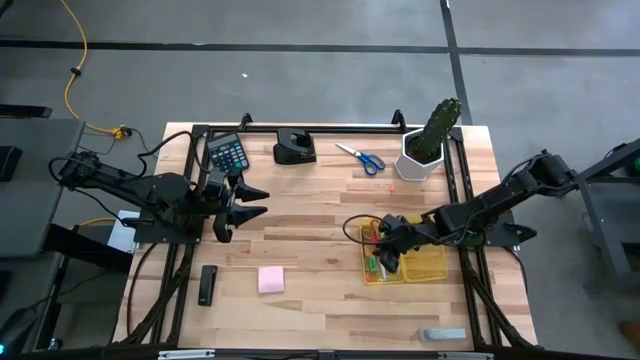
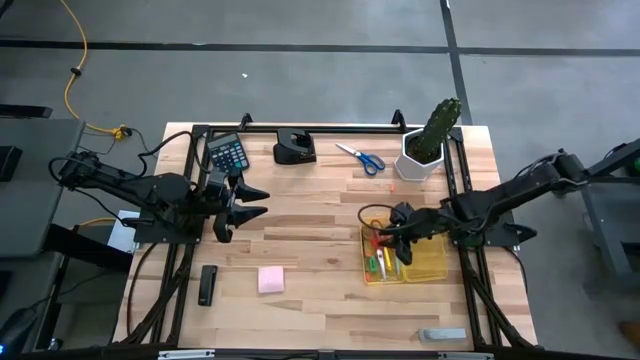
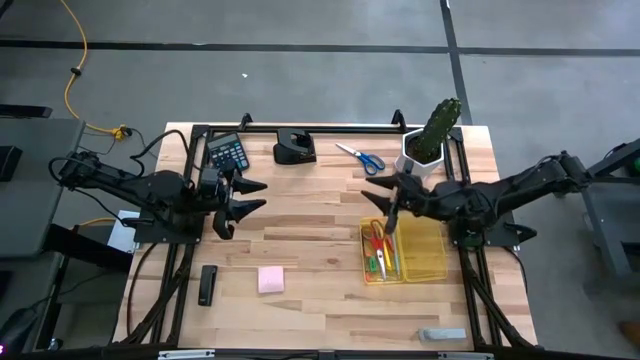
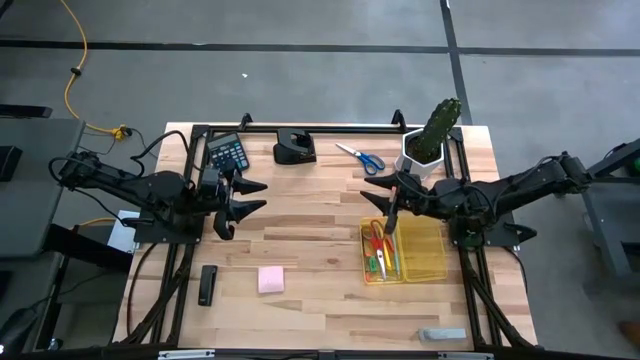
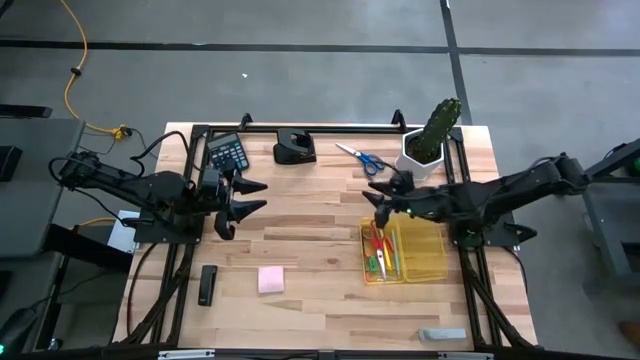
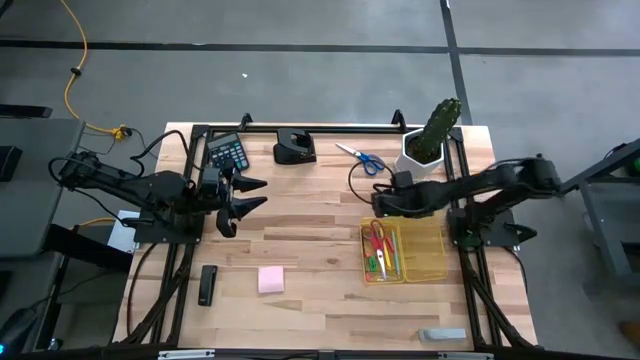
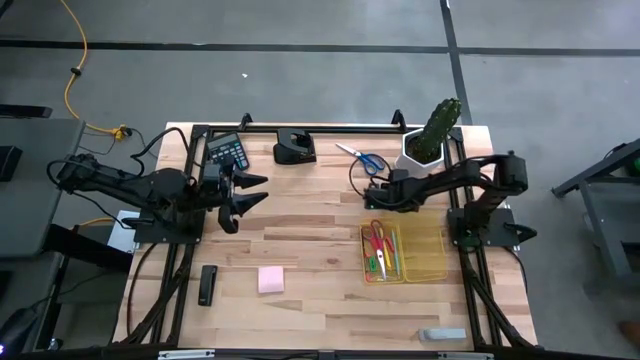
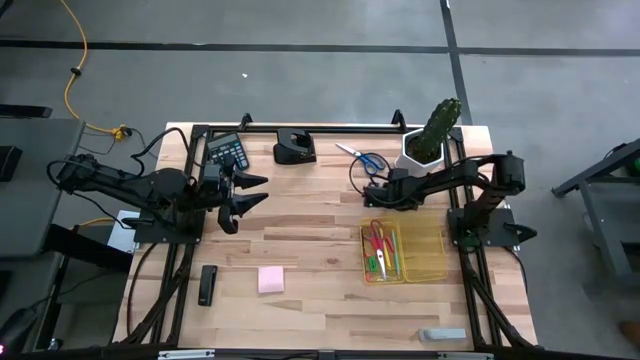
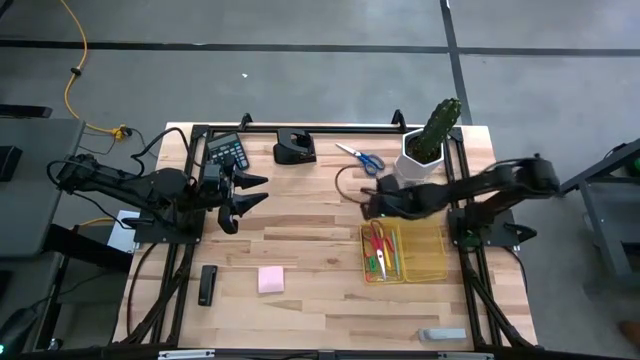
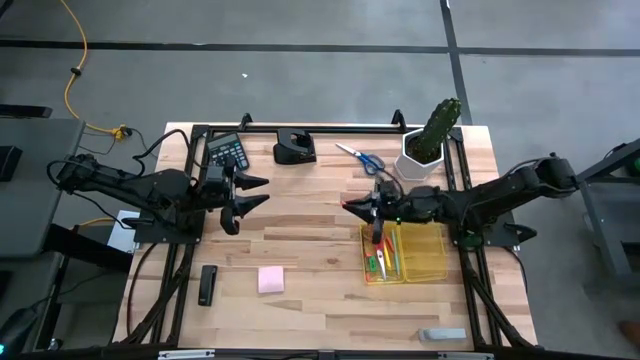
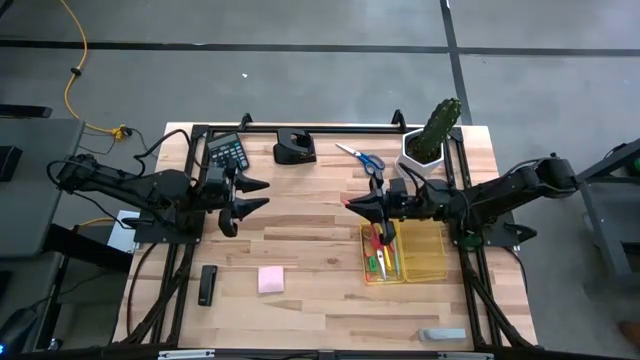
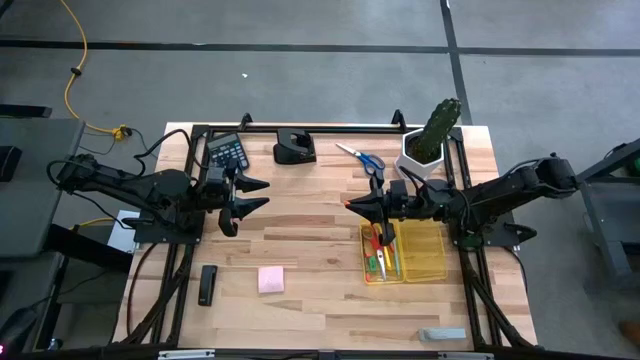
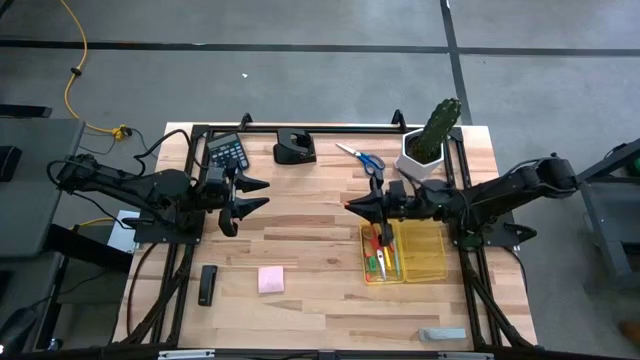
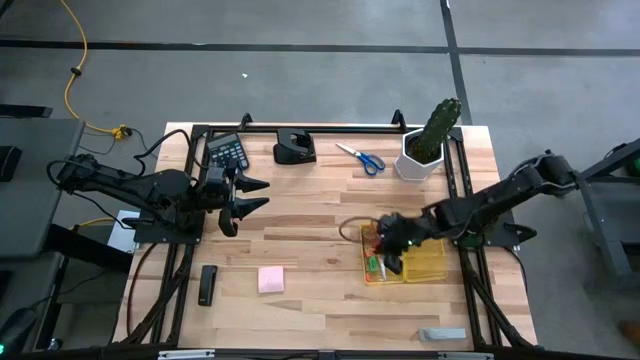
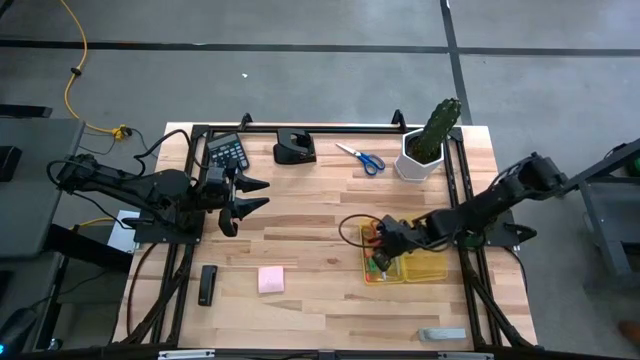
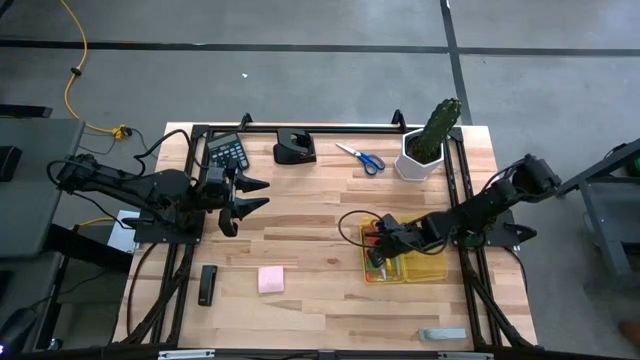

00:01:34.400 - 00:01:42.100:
Task: Pack school essentials
Put the orange eraser cap into the yellow box

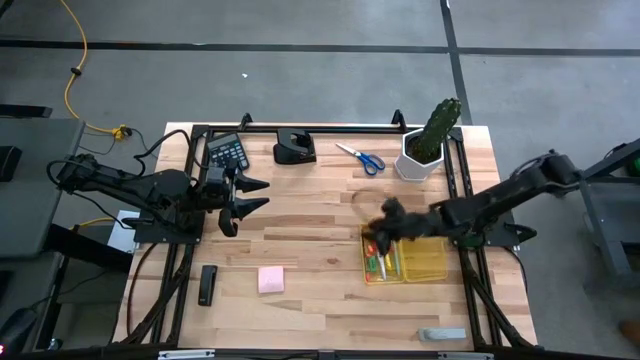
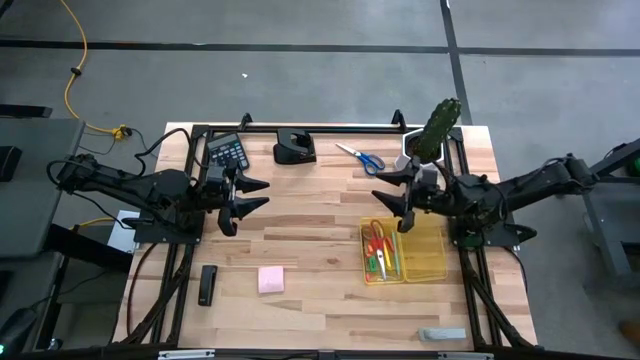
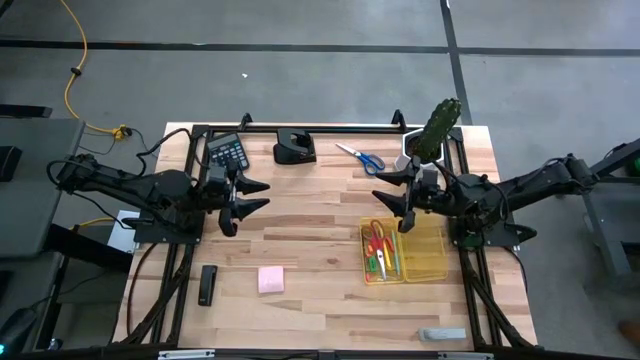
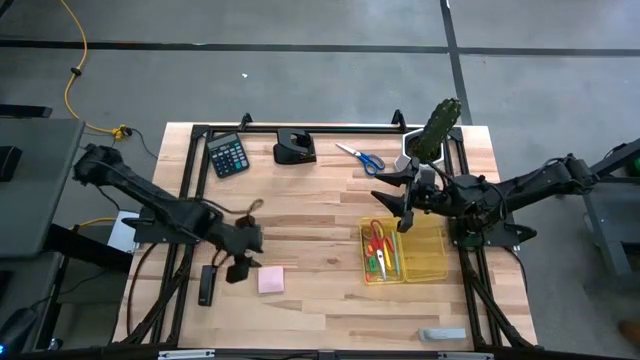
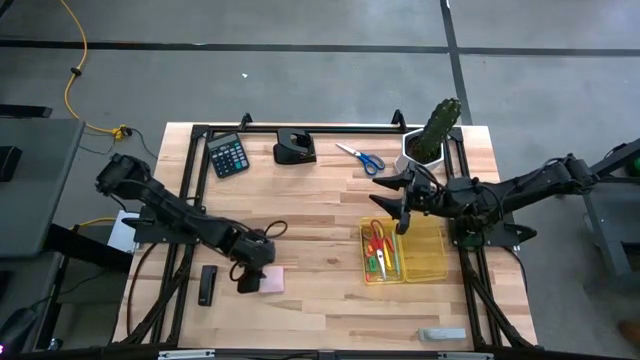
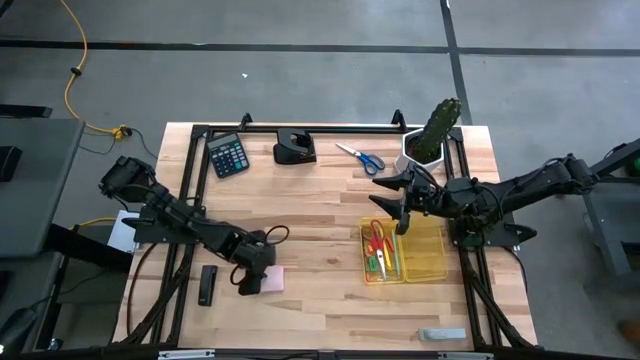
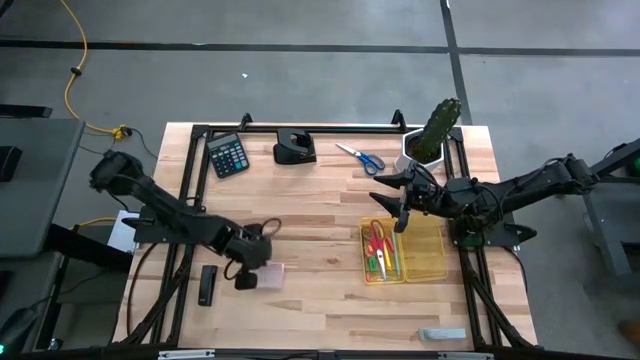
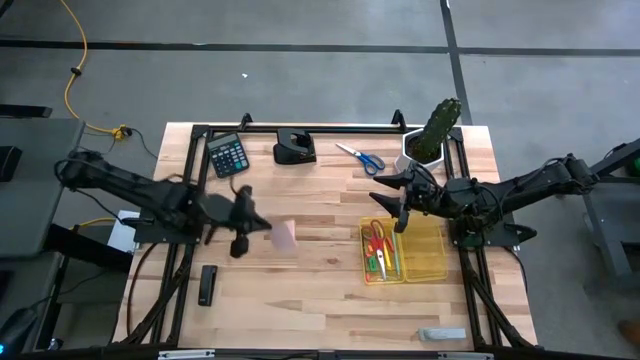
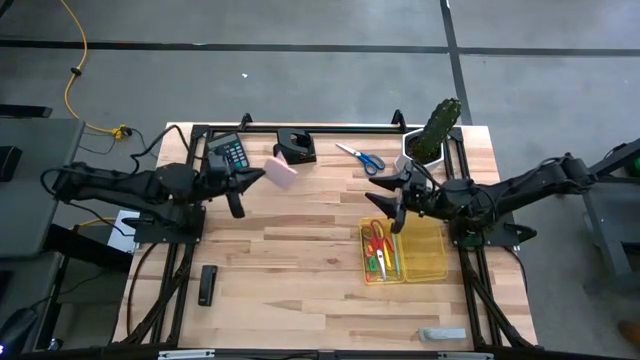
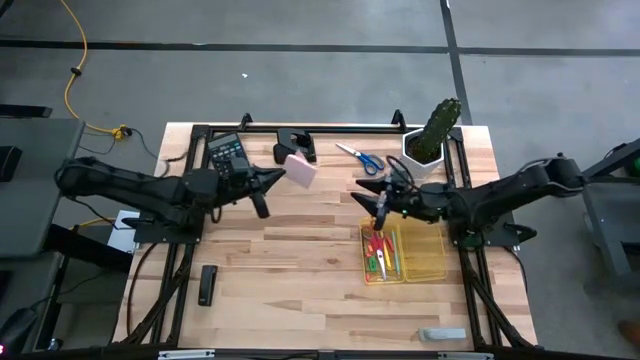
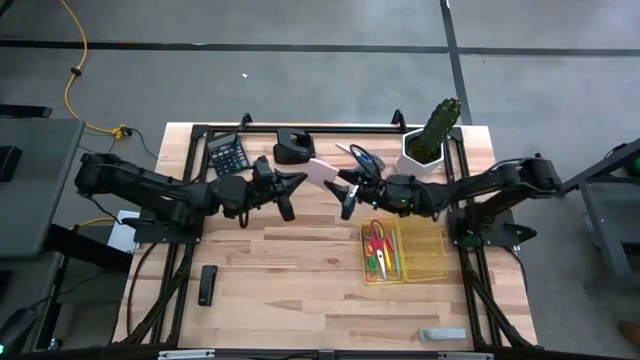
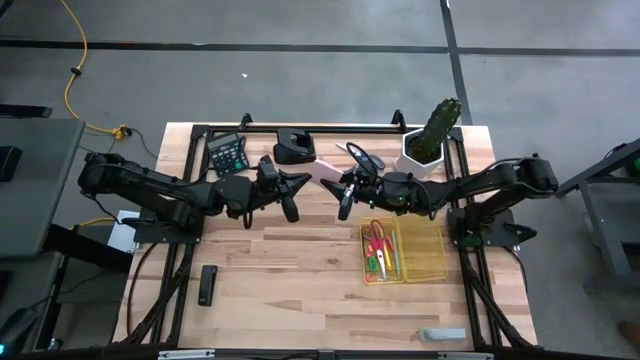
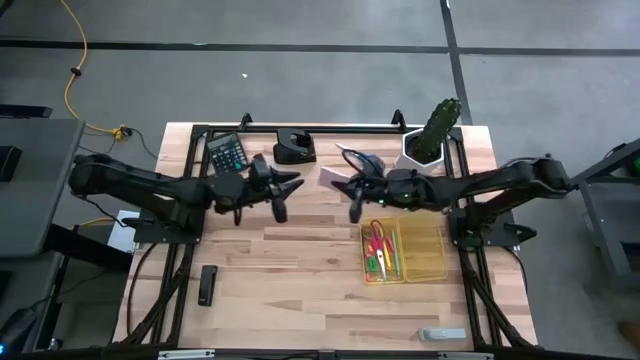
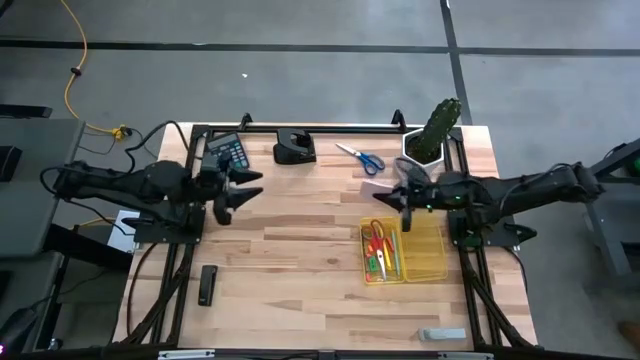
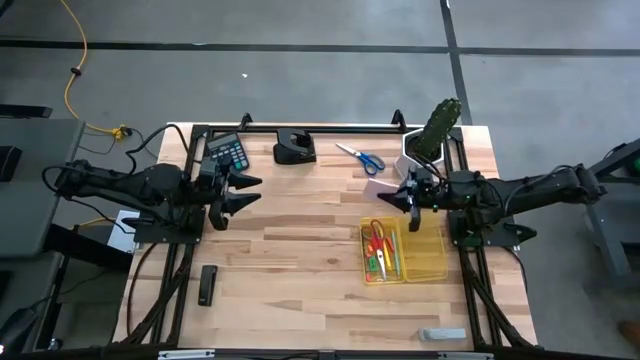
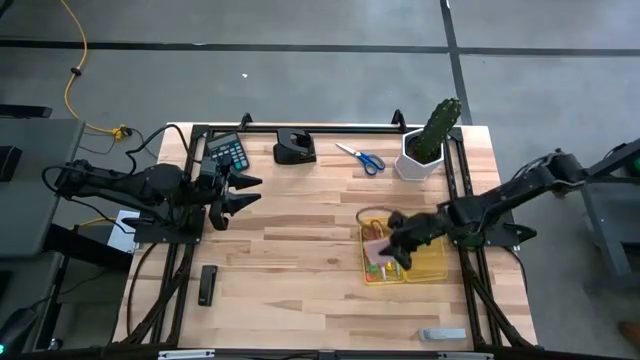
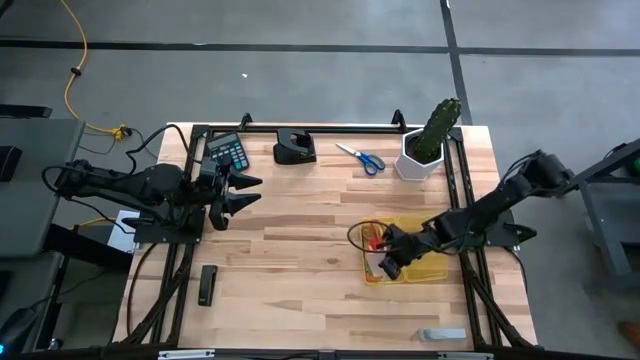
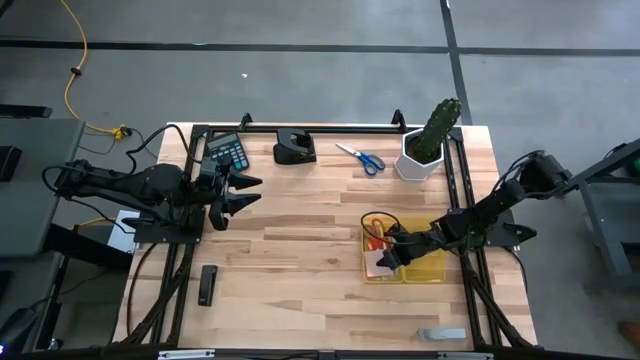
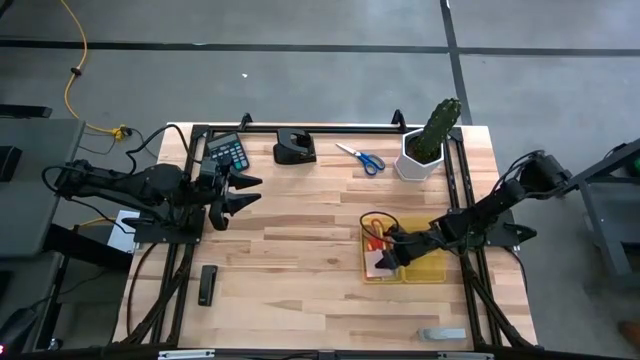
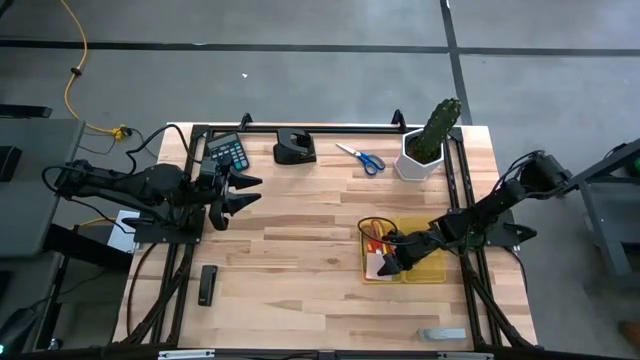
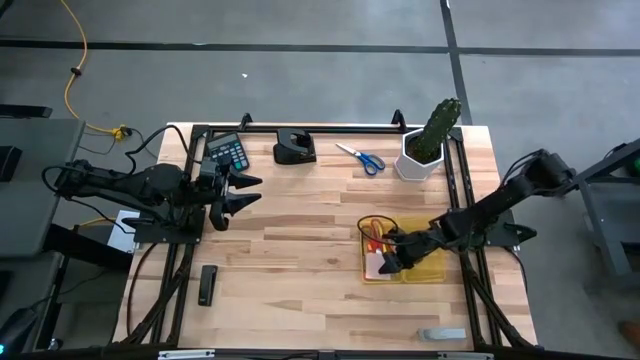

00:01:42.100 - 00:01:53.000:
Put the pink sticky notes into the yellow box

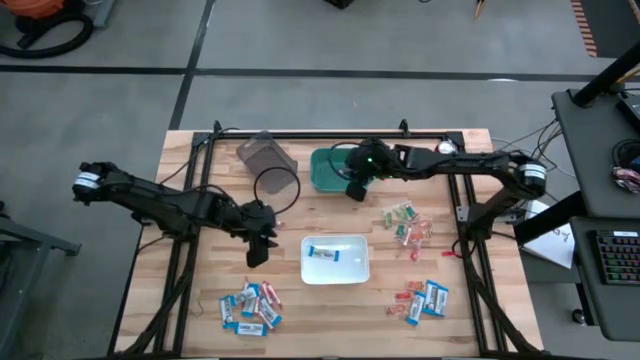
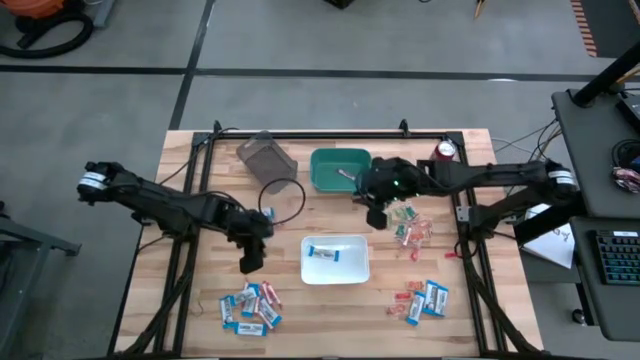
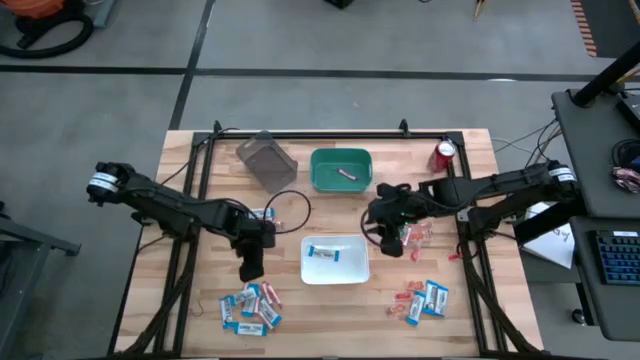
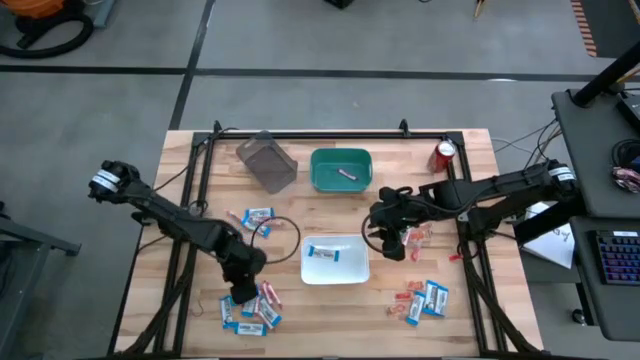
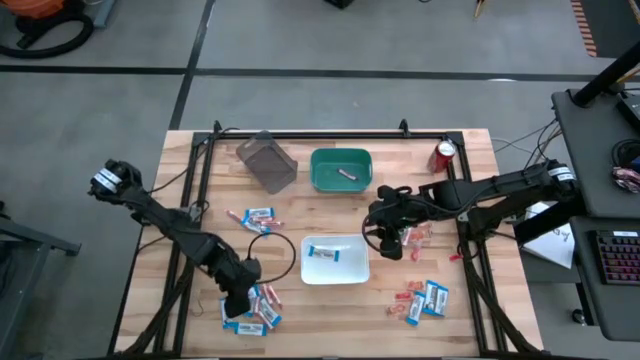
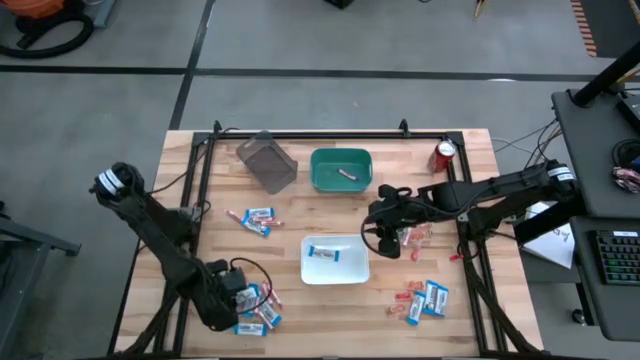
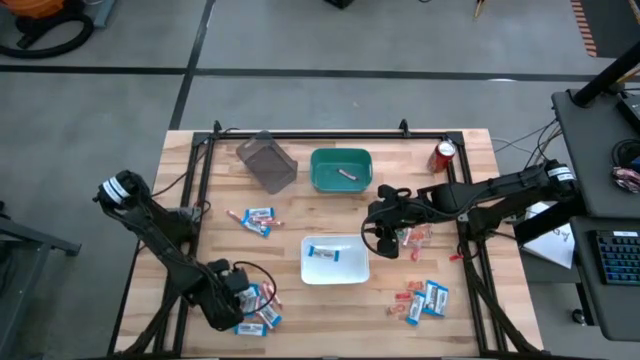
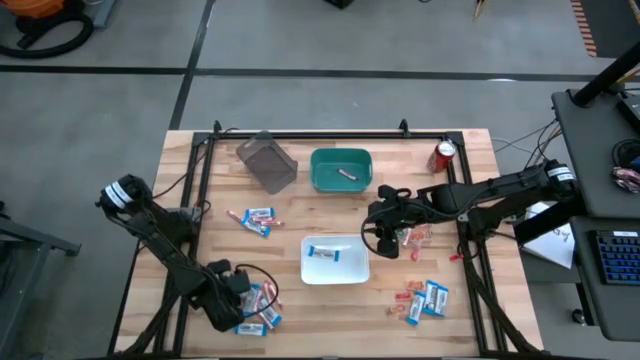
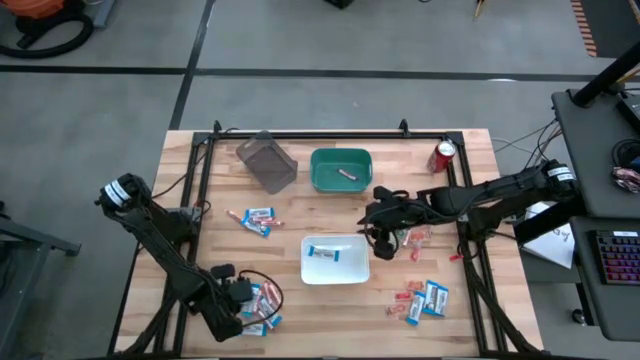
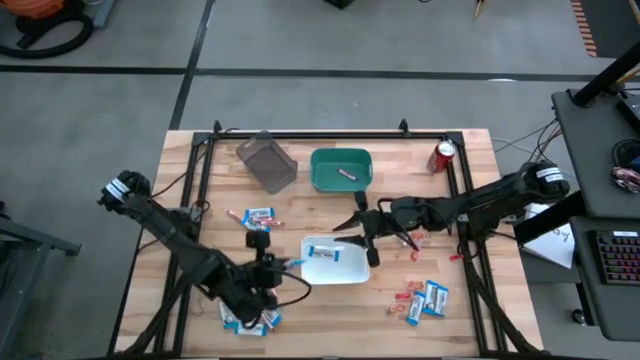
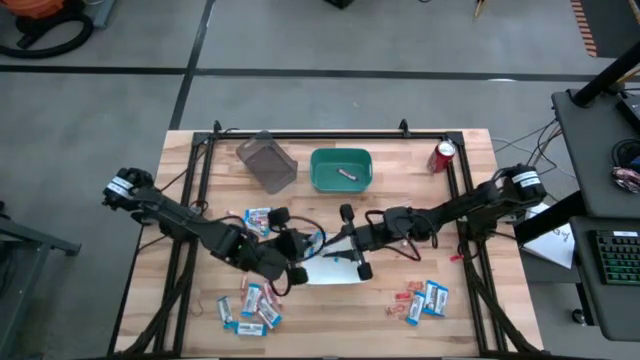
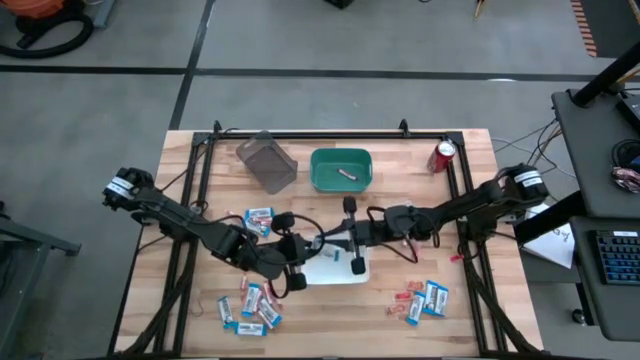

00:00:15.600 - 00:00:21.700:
Task: Sort candy
Put the white chocolate bar into the white bin
